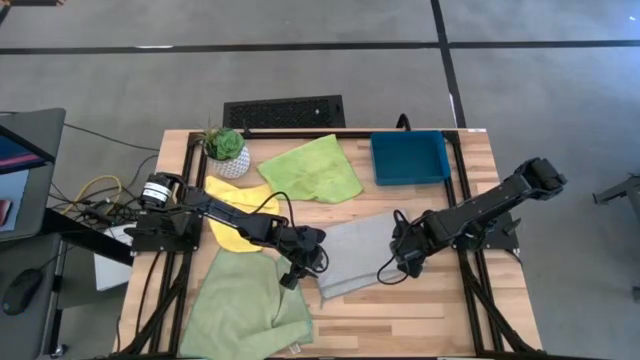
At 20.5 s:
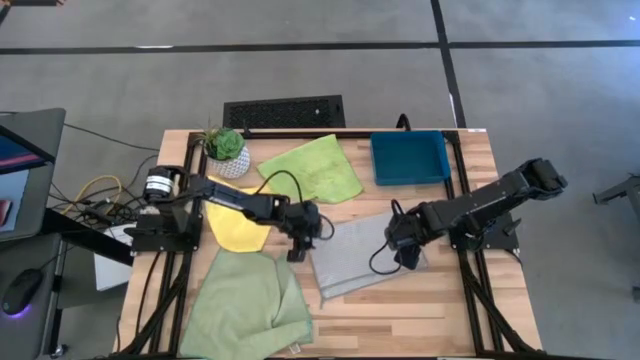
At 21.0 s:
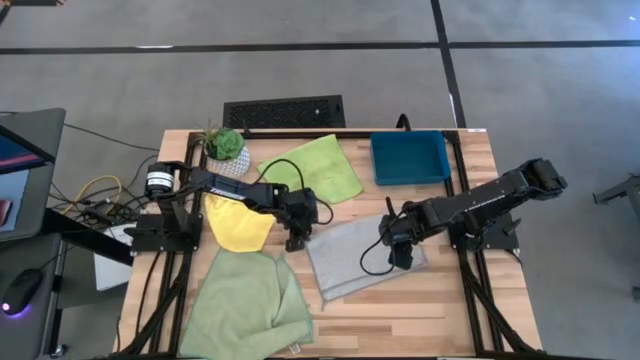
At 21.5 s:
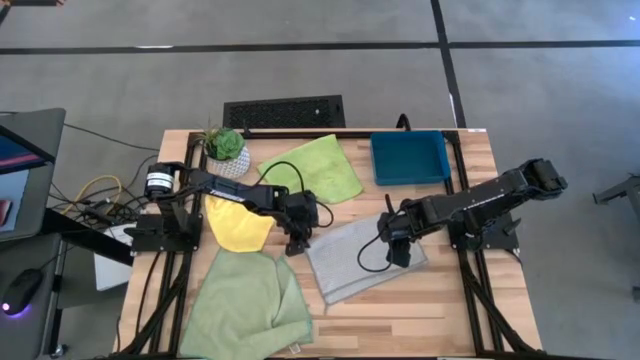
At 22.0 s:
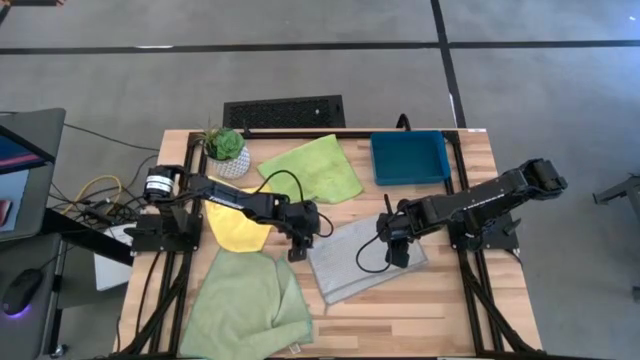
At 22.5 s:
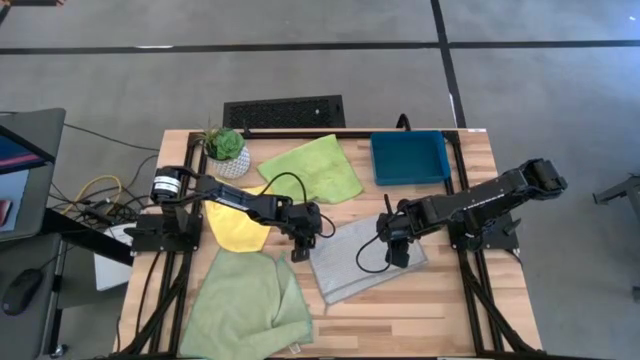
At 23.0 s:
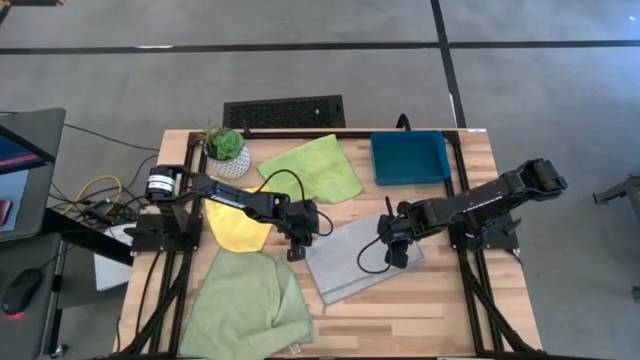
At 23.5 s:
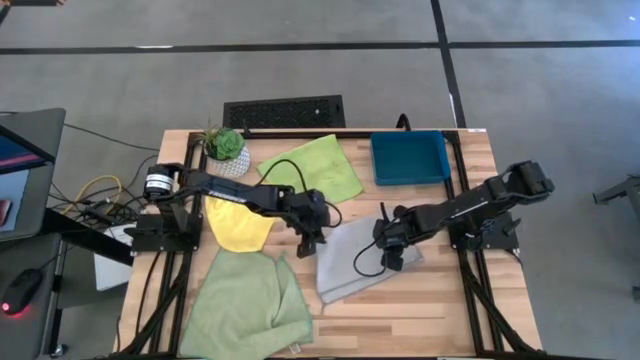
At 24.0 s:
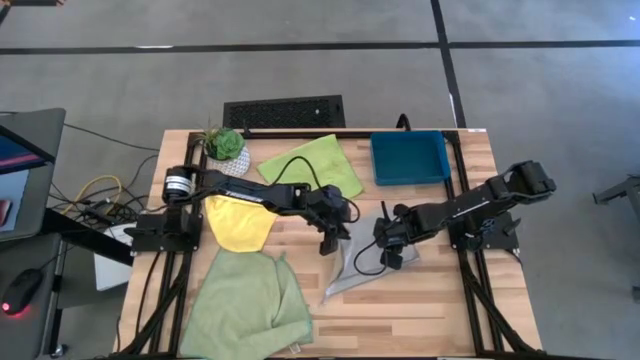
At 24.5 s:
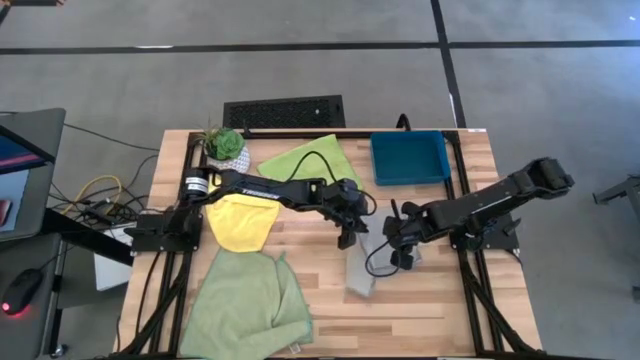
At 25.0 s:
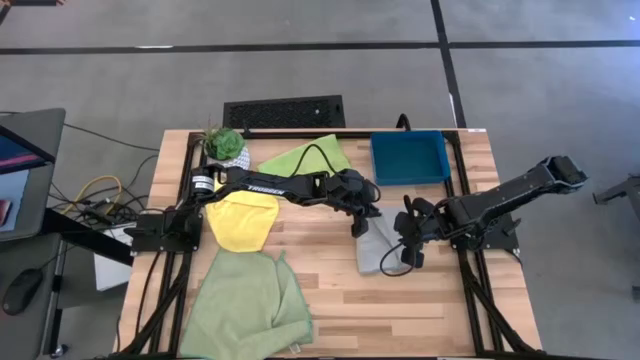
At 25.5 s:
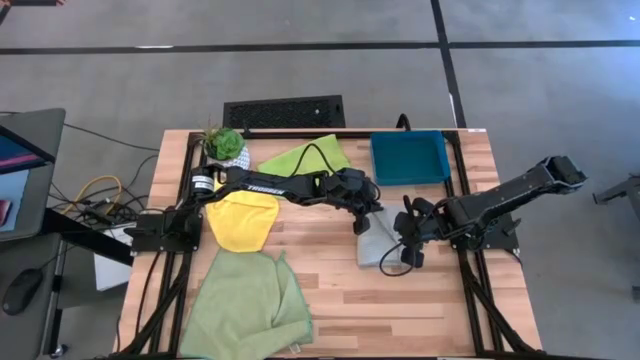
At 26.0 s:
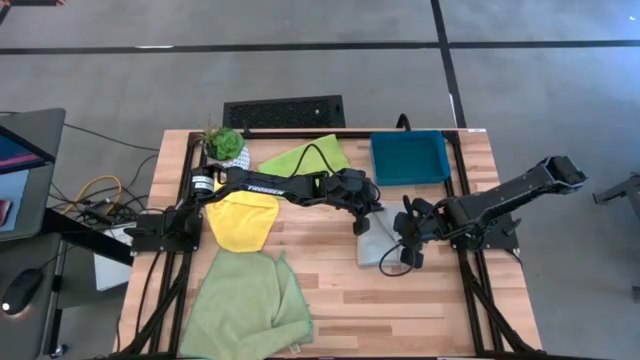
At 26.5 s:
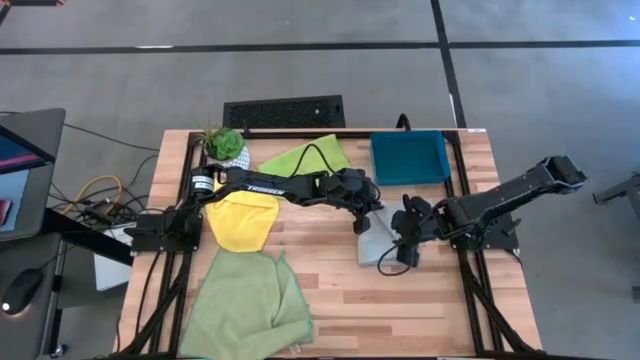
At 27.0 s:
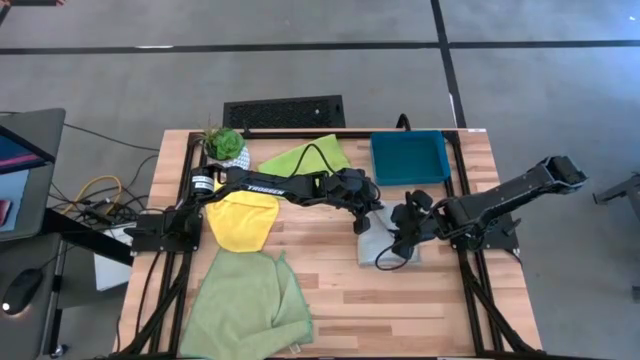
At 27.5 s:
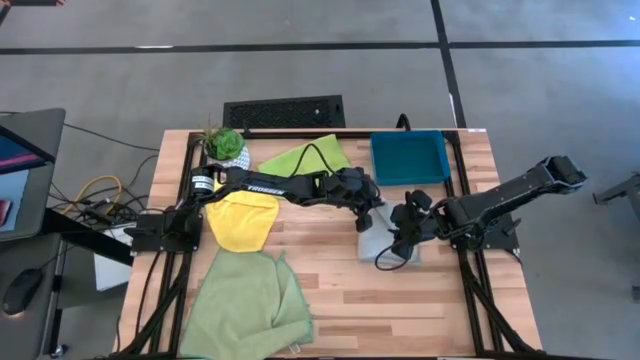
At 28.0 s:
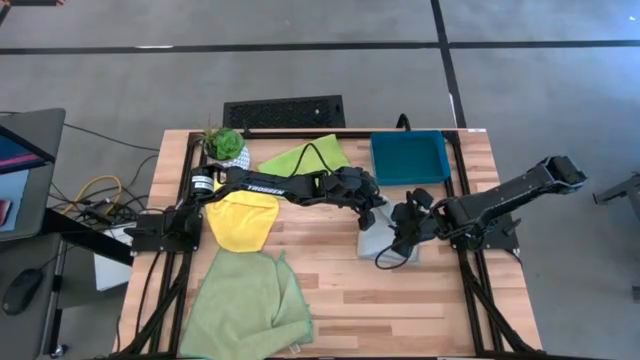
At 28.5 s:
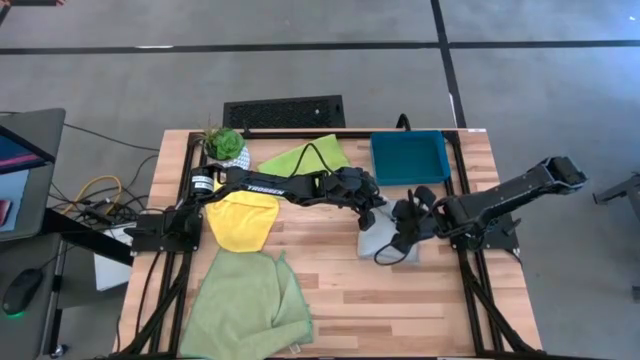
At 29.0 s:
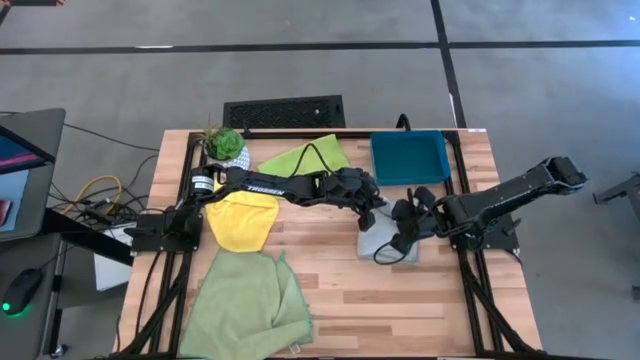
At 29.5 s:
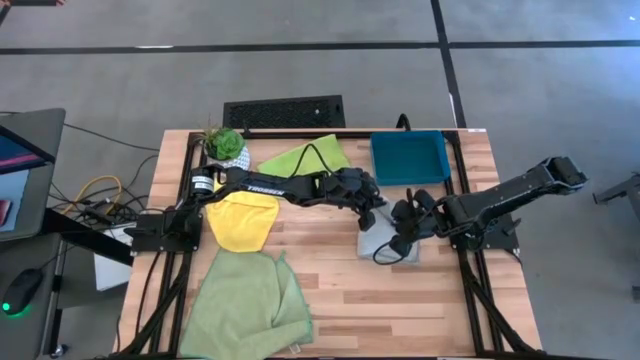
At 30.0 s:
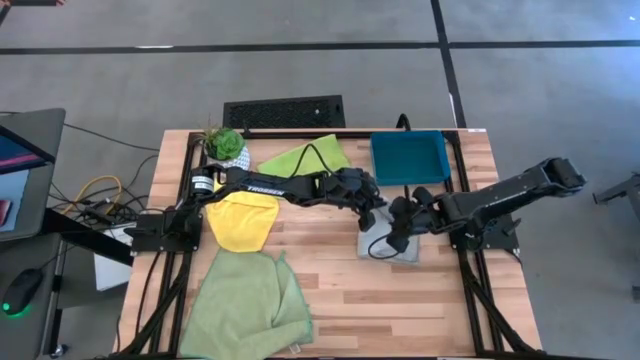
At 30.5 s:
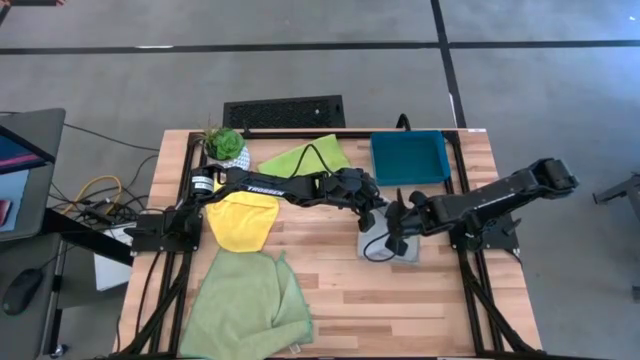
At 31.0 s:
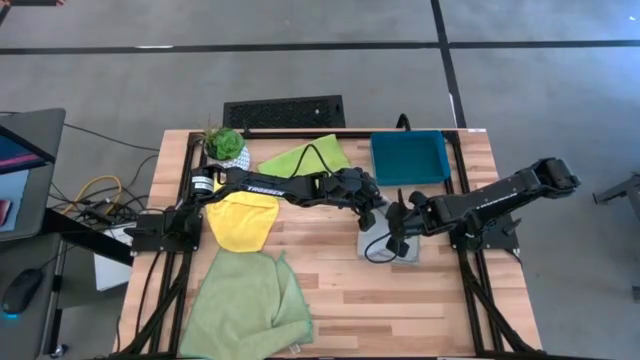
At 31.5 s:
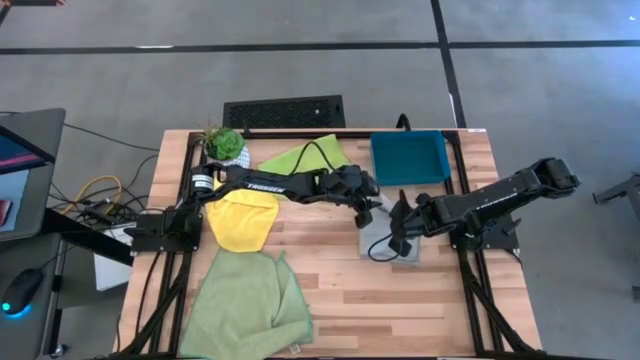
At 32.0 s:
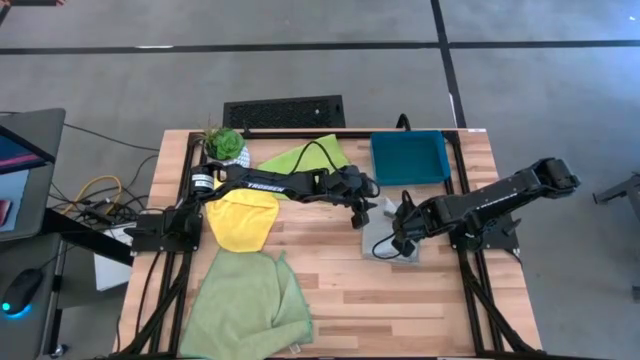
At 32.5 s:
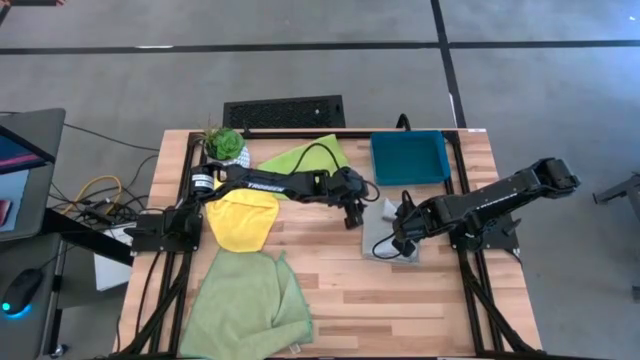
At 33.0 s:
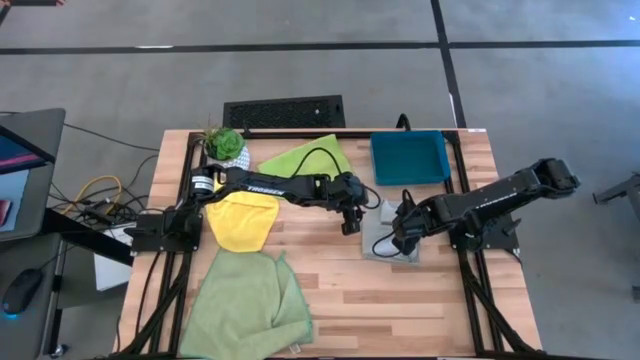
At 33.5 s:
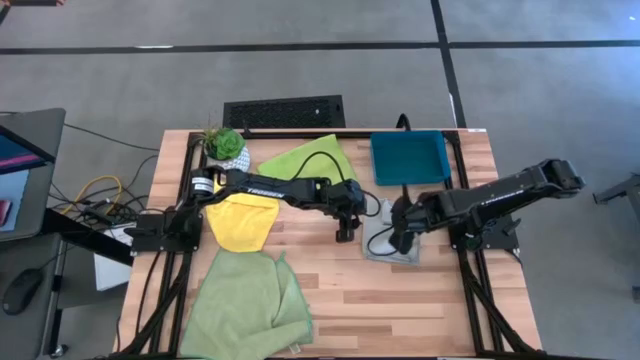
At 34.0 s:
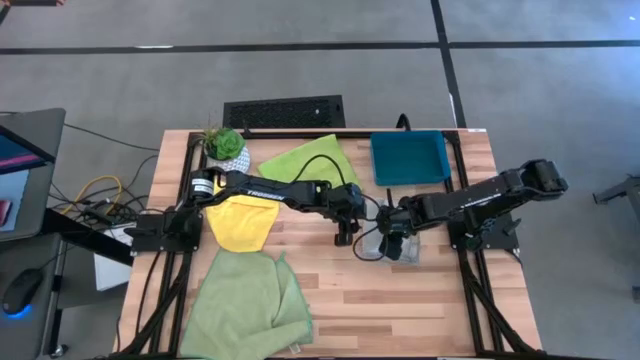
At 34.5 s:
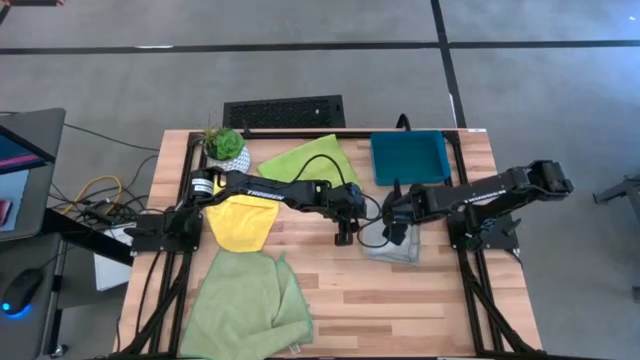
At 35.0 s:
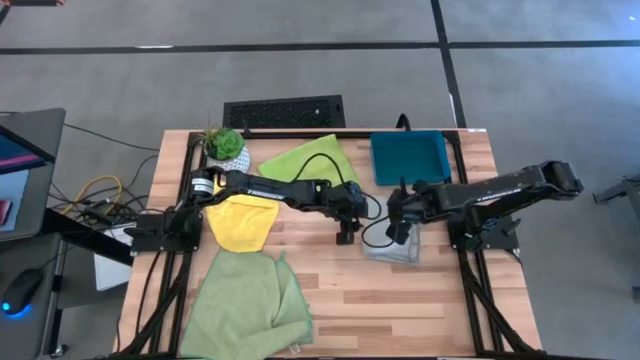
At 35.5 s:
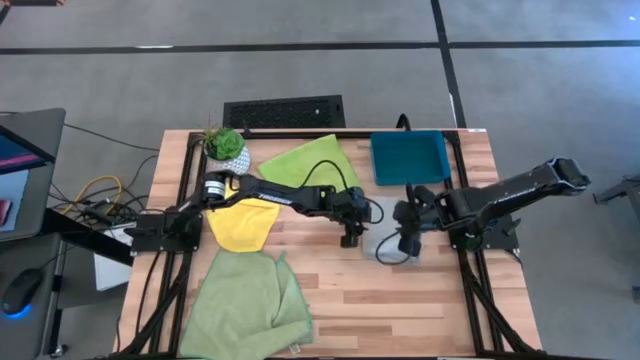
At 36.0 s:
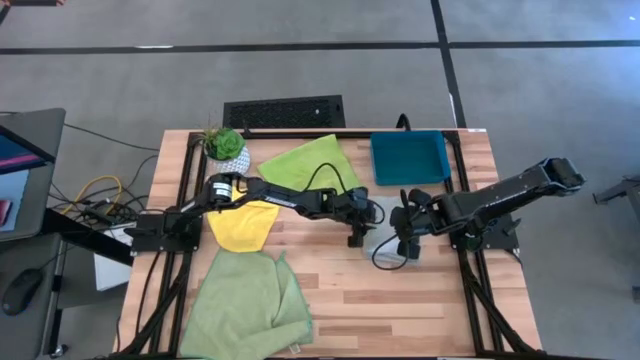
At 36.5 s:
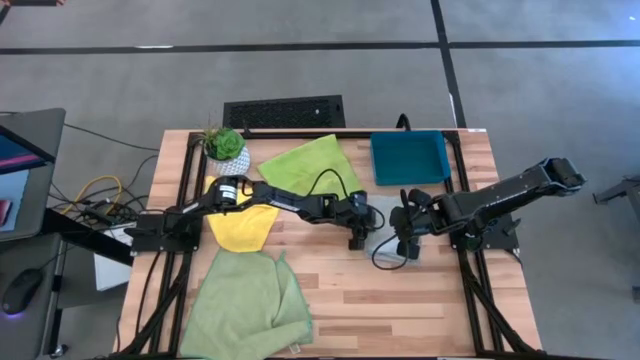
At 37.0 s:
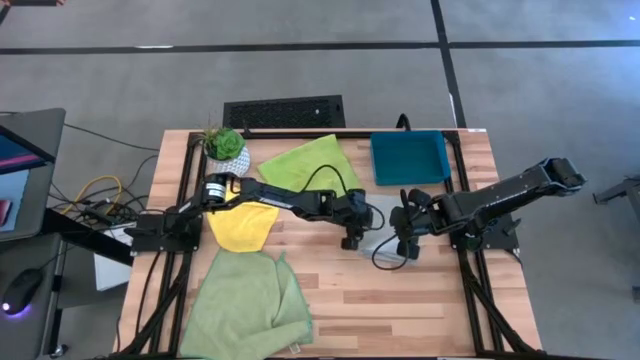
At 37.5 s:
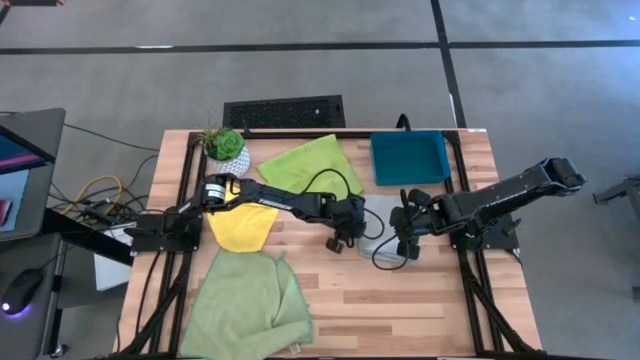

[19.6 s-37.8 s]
Task: Fold microfiber towels
Fold the gray microfiber towel

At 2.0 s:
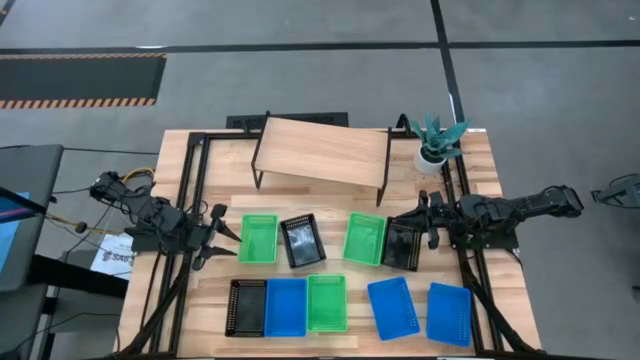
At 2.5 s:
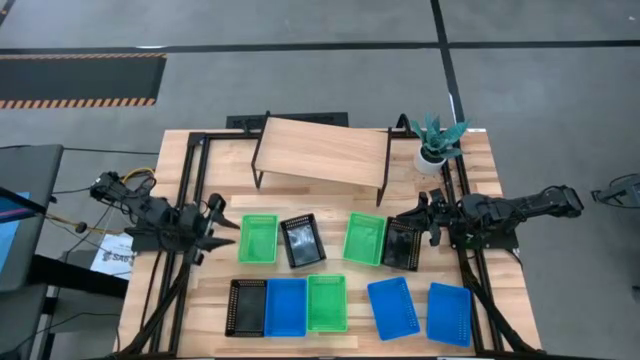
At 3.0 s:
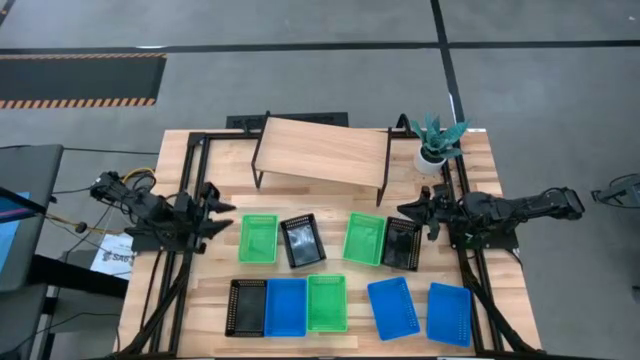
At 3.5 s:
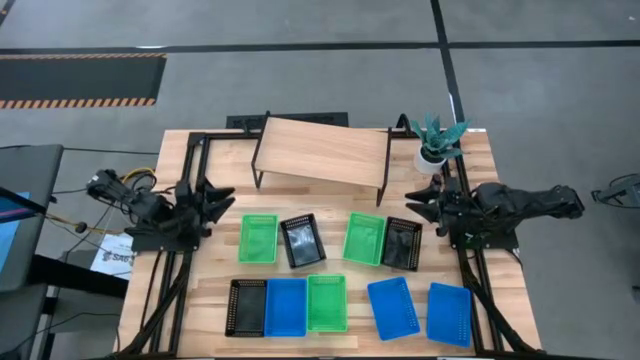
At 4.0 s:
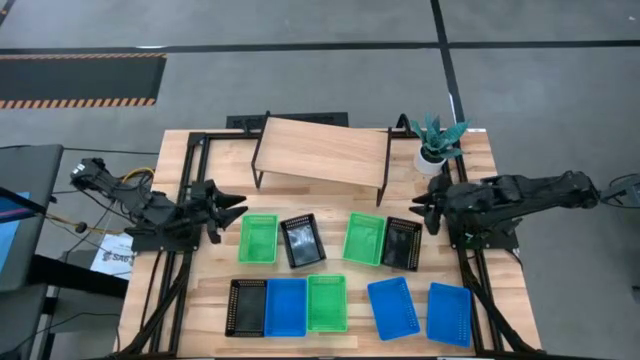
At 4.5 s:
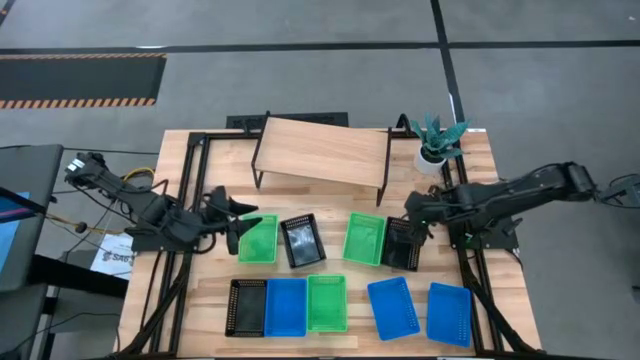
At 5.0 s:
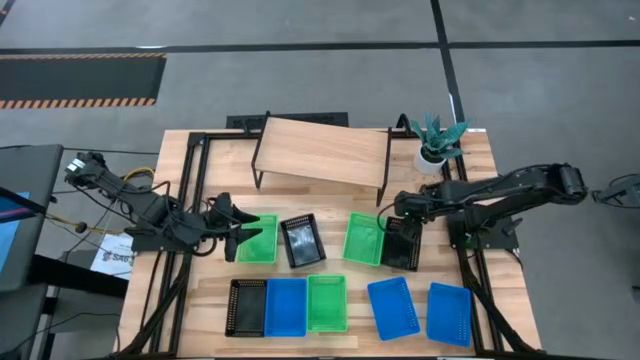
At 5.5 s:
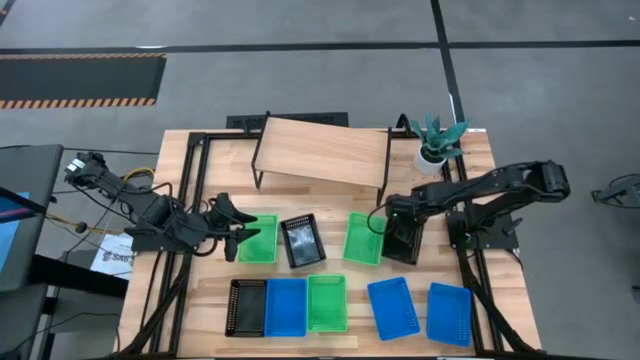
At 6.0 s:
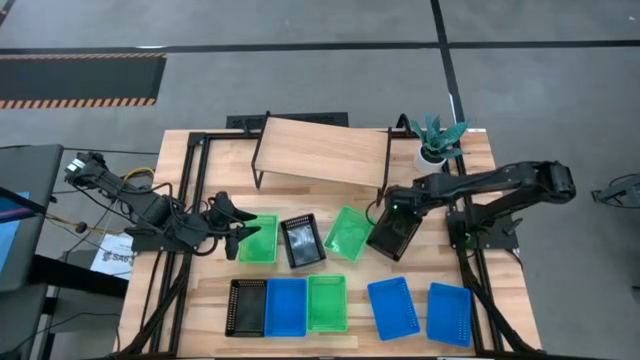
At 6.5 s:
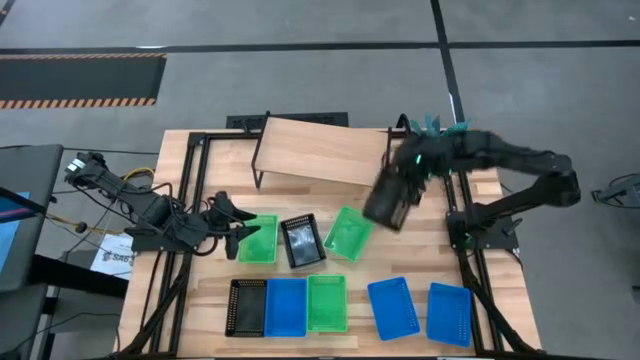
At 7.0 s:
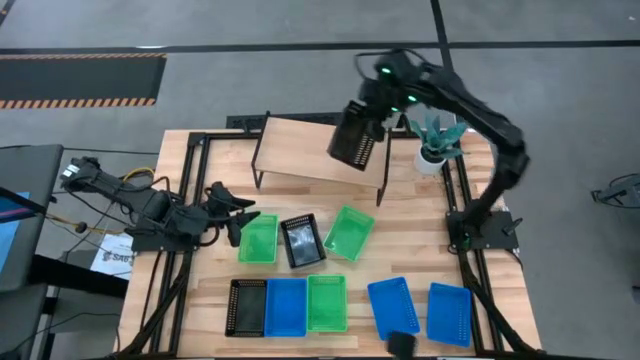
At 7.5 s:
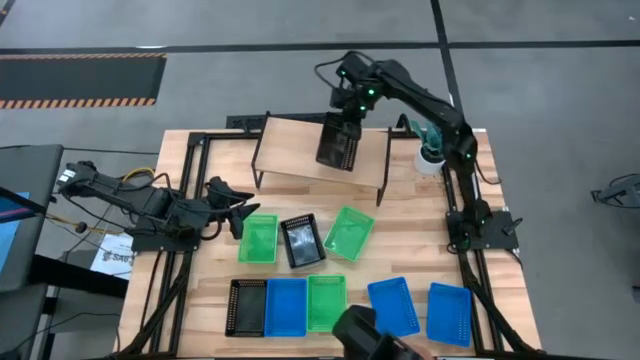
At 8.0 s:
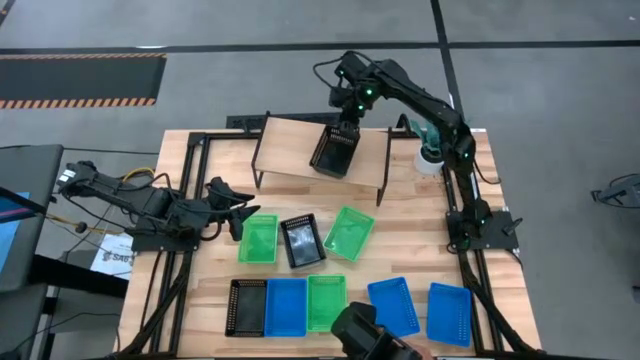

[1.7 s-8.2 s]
Task: Stack baskets on shelf by color
Put the top right black bin on the shelf
